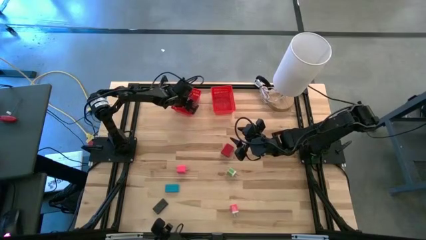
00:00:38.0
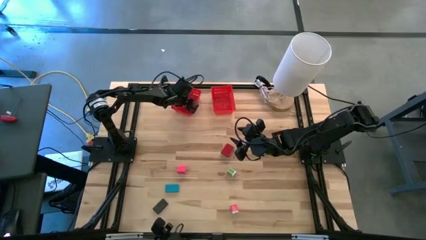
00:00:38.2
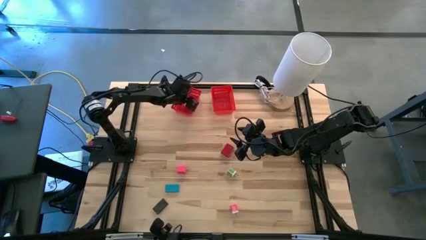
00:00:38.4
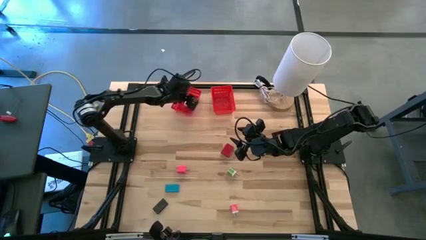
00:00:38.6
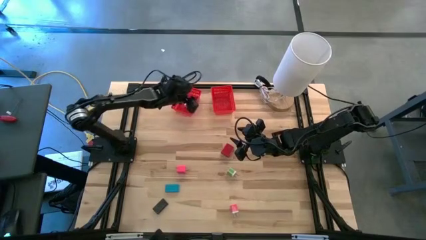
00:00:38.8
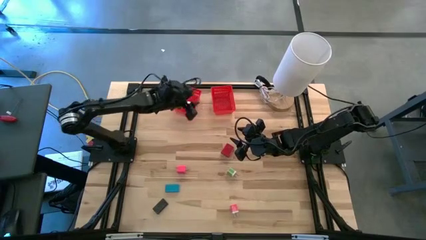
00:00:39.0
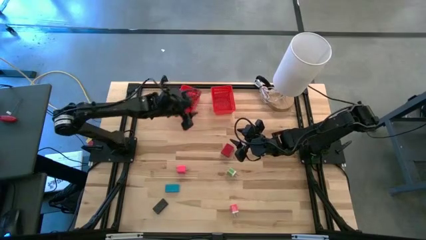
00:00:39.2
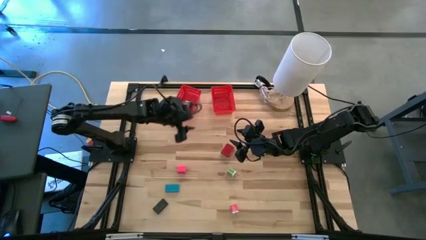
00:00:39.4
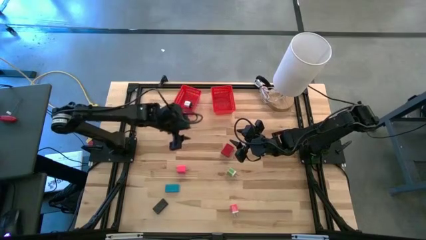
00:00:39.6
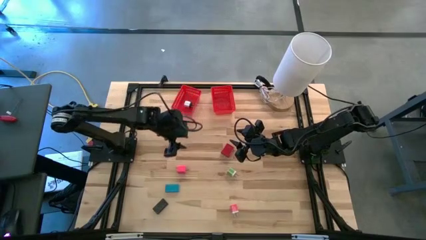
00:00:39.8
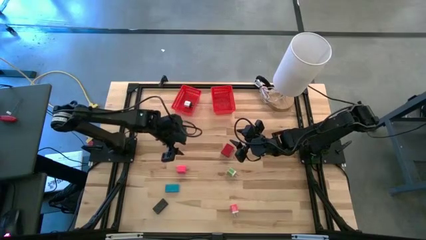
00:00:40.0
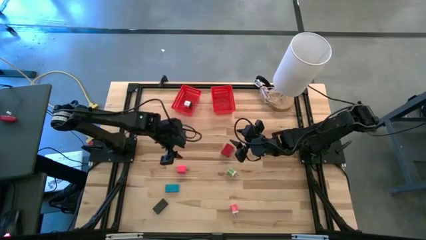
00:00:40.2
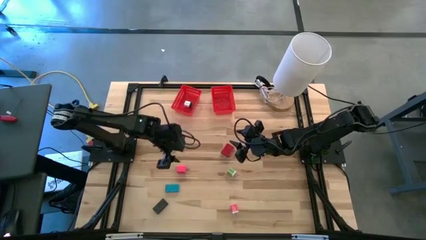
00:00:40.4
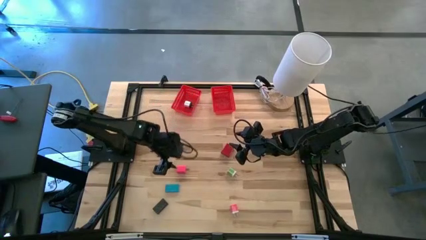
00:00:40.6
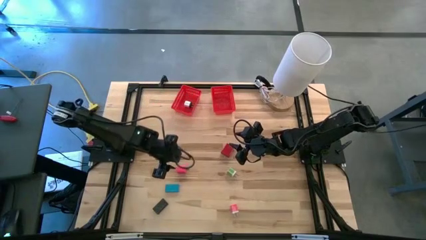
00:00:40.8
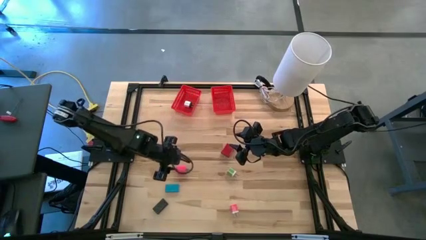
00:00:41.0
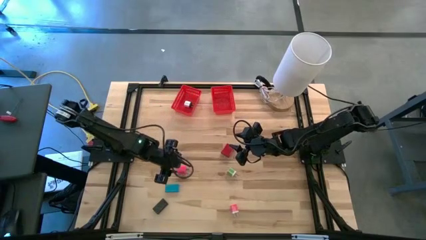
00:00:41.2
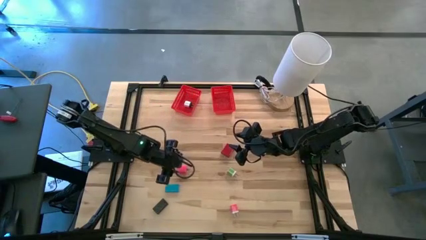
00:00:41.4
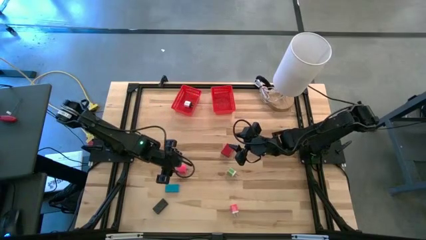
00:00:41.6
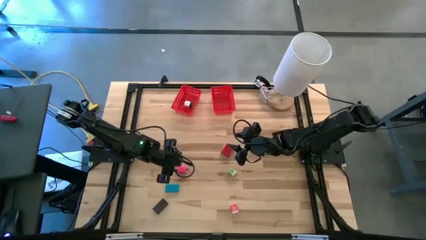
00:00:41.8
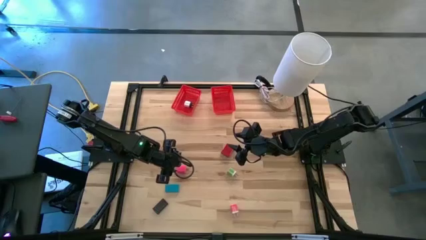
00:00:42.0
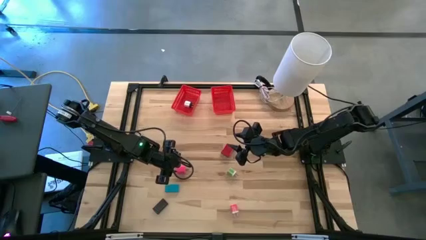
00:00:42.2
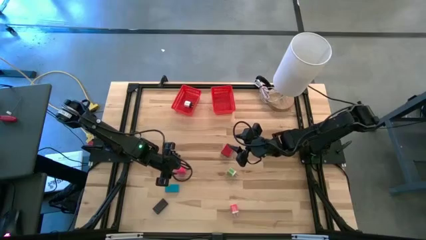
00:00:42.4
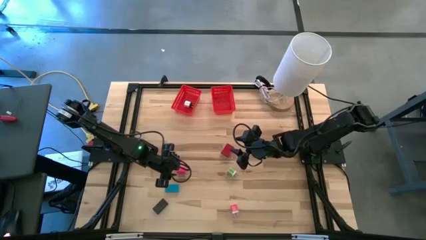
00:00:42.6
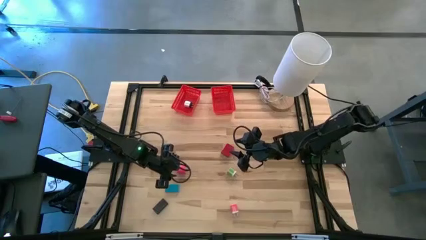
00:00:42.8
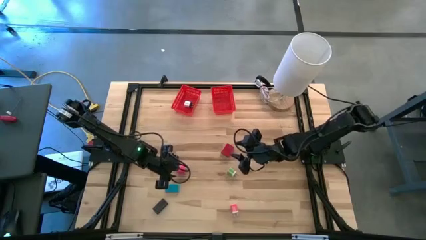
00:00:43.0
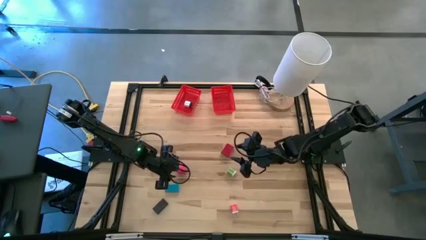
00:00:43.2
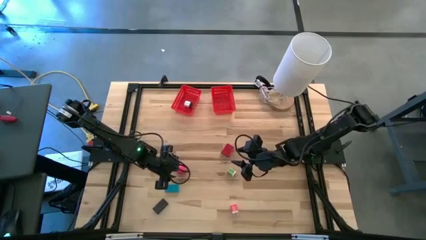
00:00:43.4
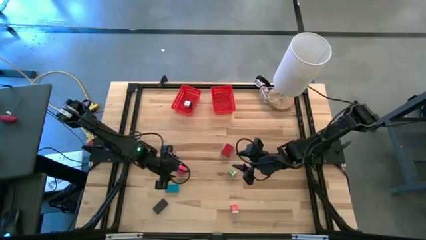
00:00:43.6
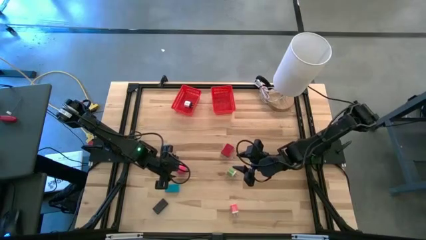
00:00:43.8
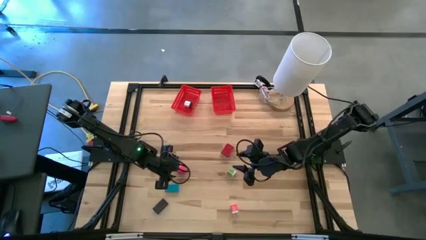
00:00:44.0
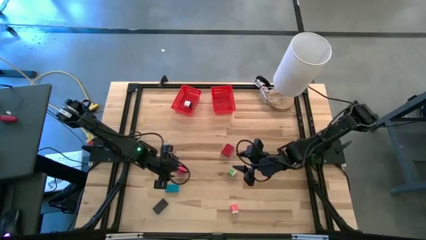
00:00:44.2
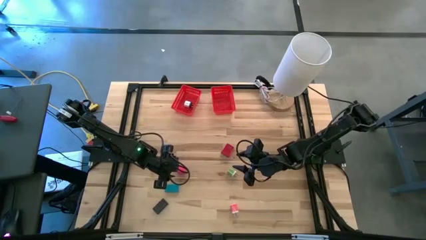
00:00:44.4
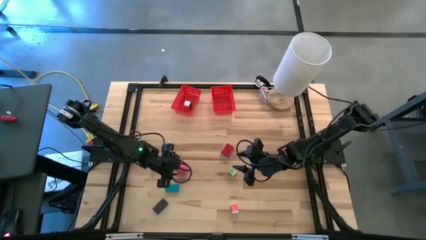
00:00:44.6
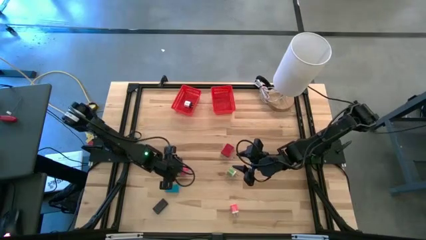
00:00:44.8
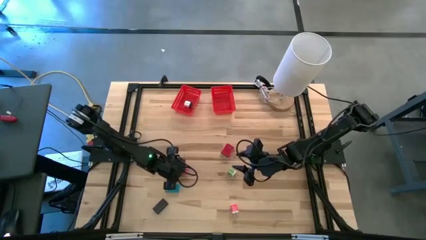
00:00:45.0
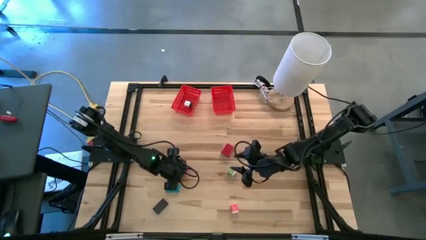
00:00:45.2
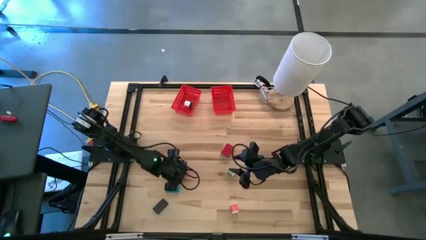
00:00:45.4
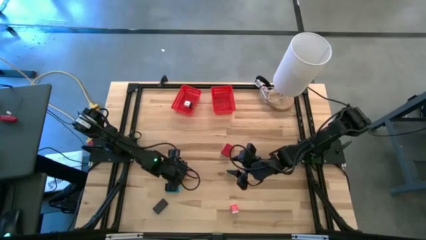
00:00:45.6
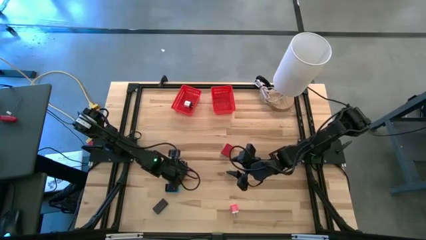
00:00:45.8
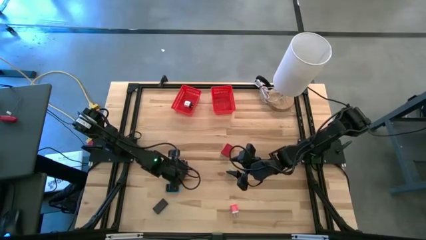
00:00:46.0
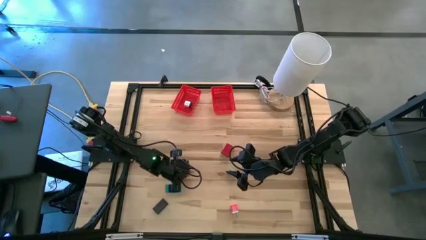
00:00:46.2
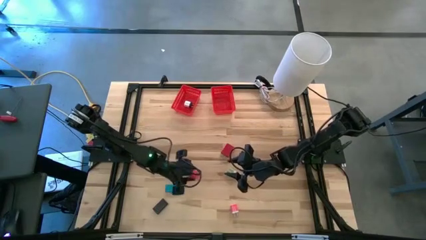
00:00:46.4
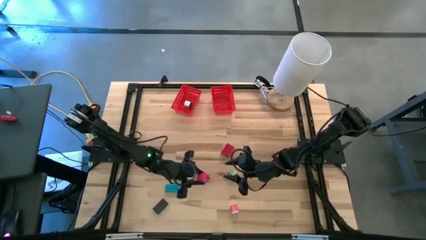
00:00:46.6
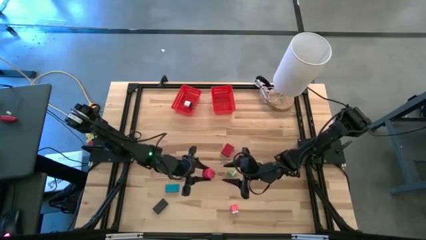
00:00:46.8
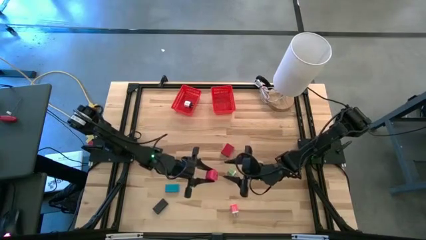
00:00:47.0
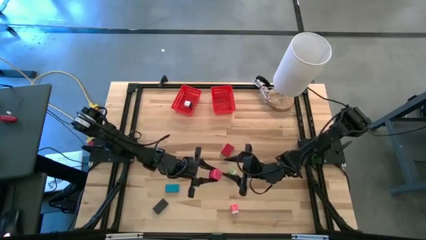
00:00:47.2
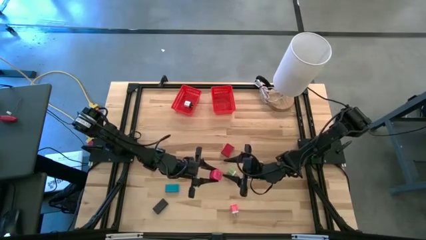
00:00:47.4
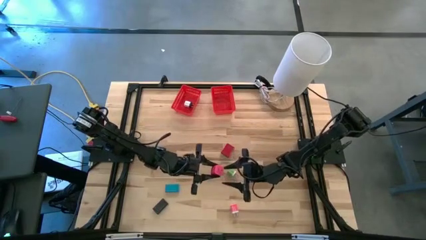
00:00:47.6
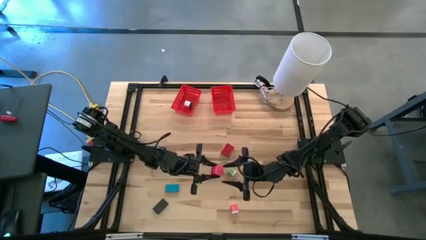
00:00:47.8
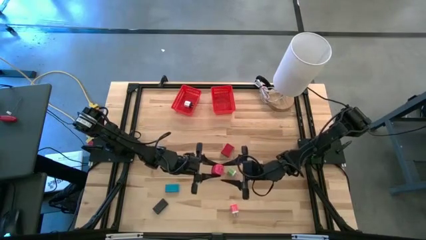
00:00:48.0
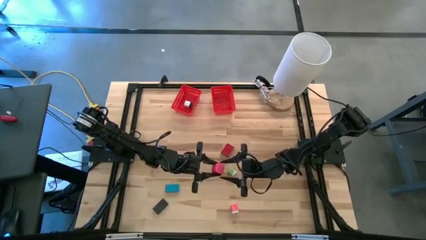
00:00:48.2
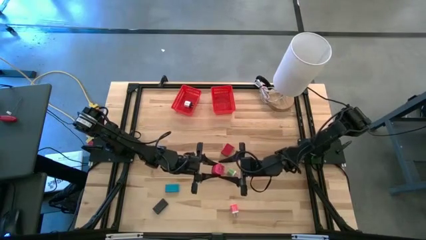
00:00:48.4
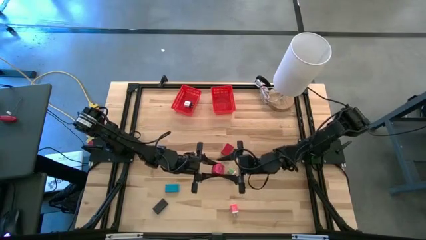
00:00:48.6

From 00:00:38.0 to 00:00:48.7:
Task: Pick & Place Office items
Put the pink charger adapter into the left red bin
